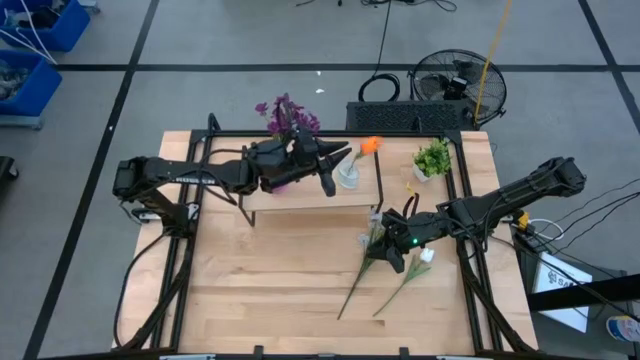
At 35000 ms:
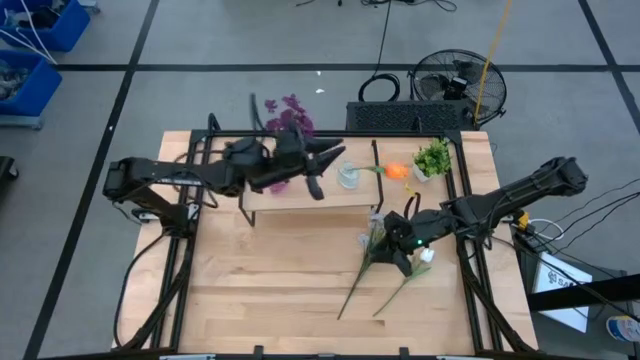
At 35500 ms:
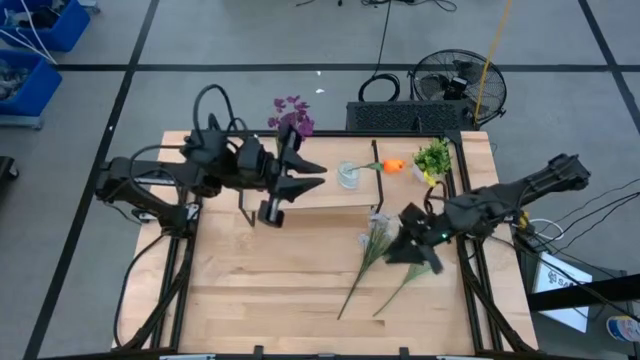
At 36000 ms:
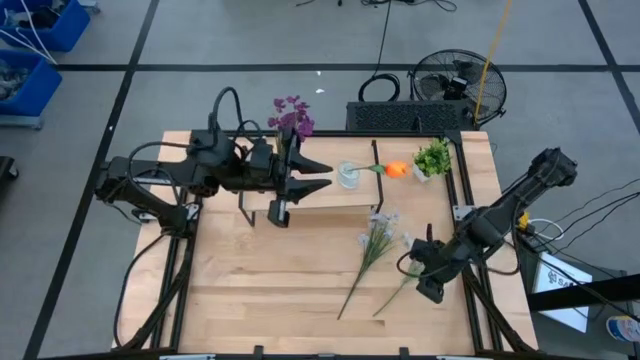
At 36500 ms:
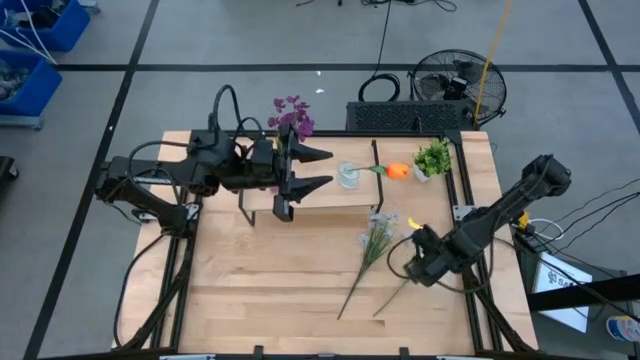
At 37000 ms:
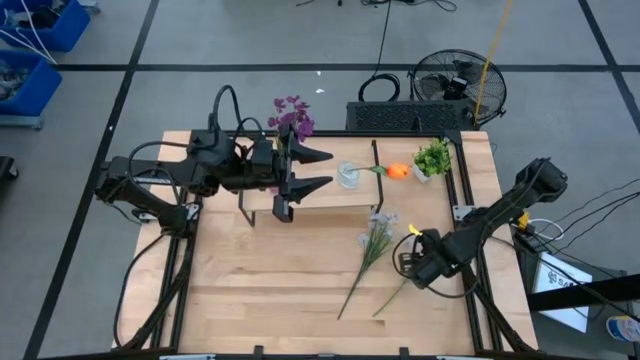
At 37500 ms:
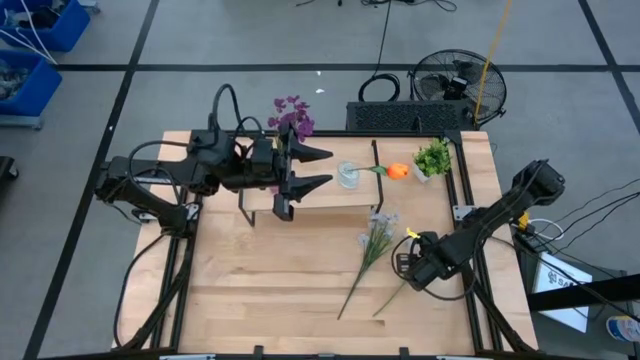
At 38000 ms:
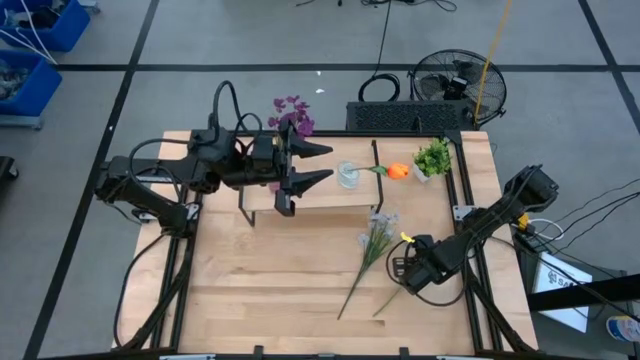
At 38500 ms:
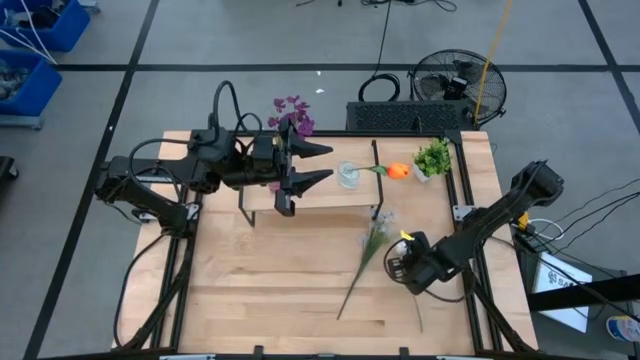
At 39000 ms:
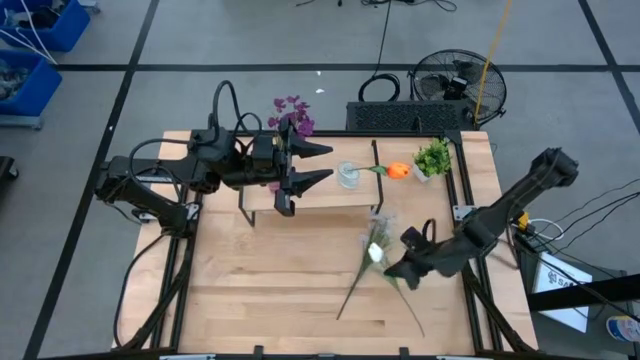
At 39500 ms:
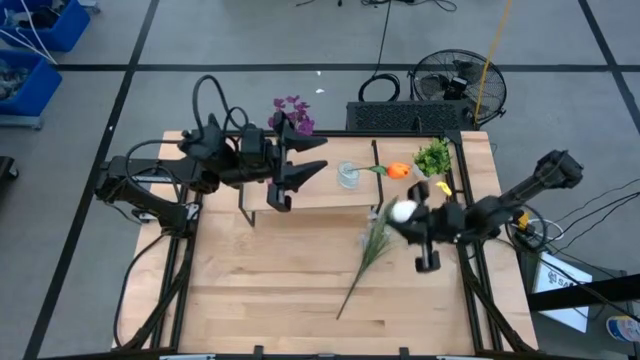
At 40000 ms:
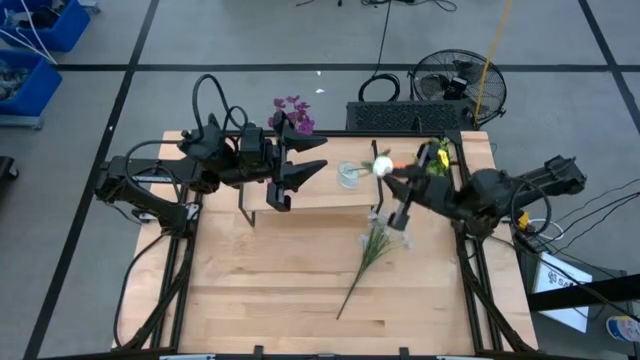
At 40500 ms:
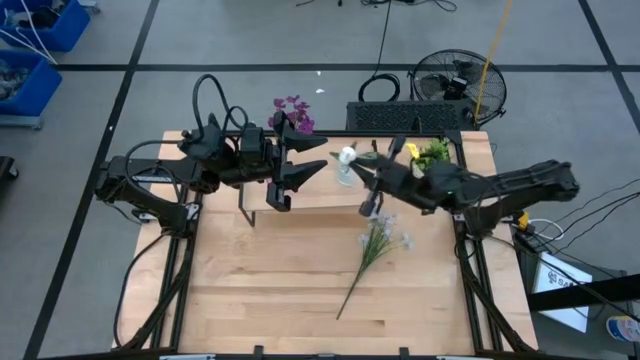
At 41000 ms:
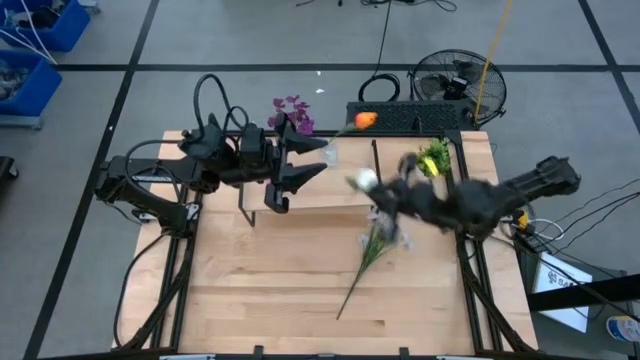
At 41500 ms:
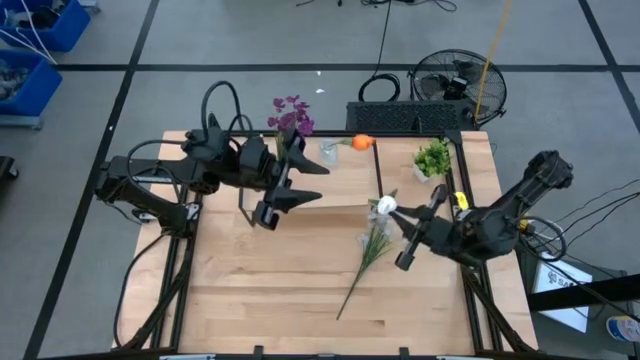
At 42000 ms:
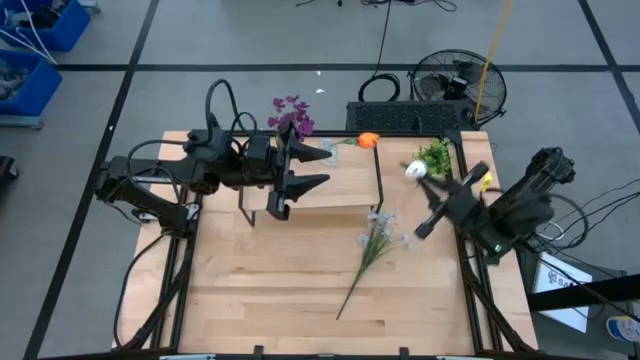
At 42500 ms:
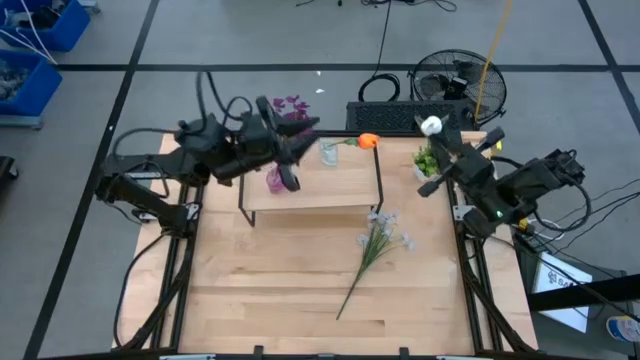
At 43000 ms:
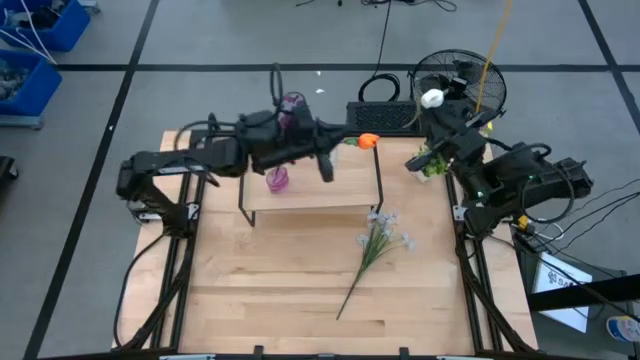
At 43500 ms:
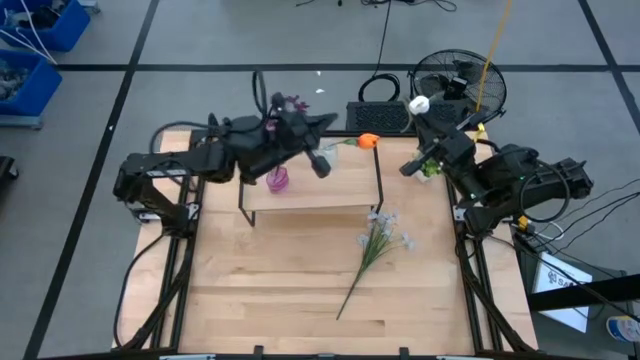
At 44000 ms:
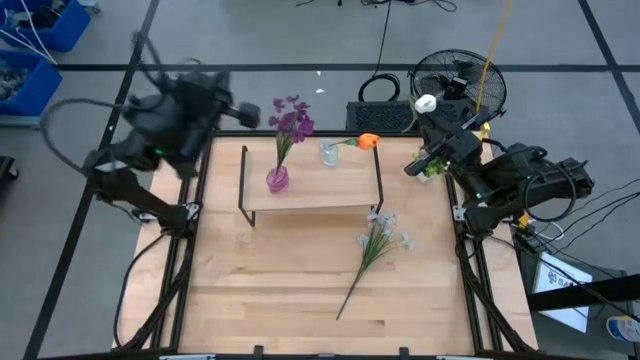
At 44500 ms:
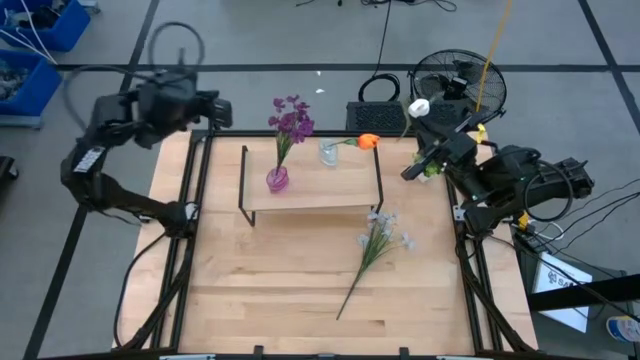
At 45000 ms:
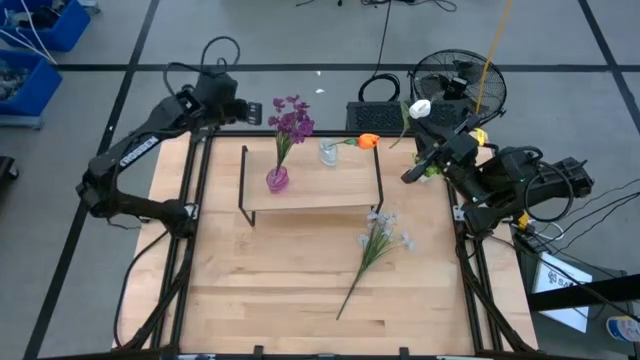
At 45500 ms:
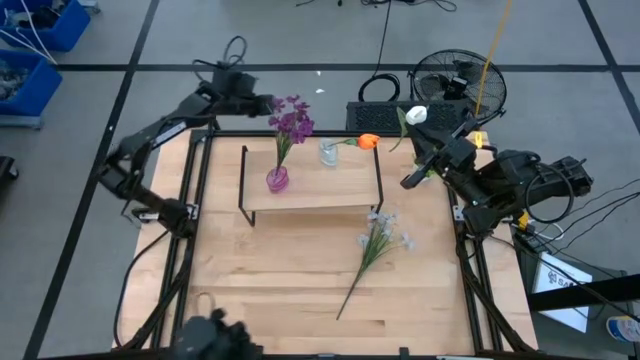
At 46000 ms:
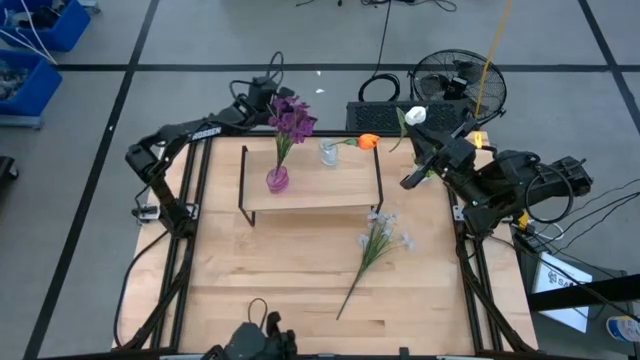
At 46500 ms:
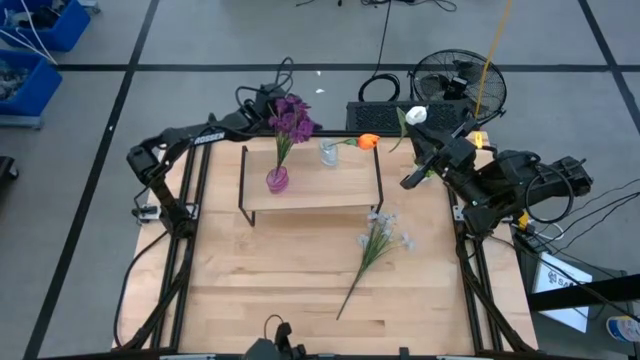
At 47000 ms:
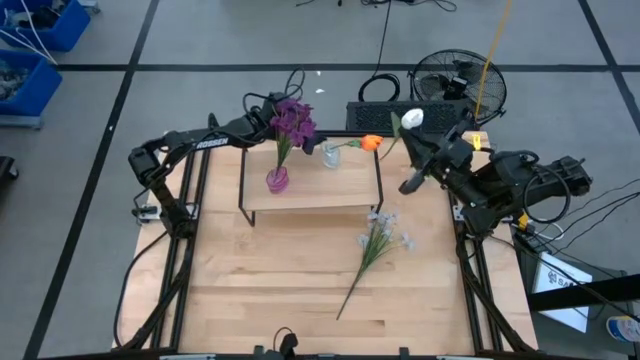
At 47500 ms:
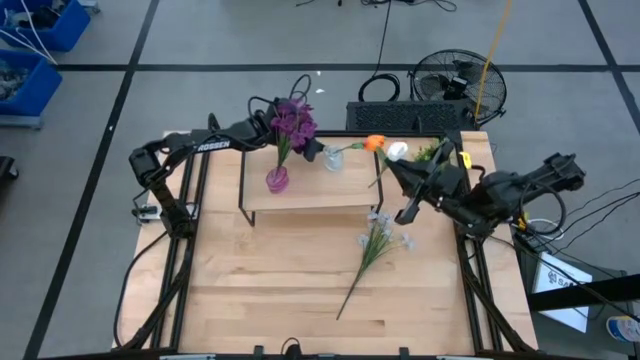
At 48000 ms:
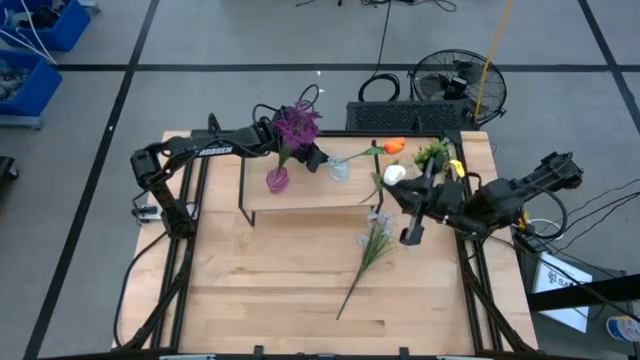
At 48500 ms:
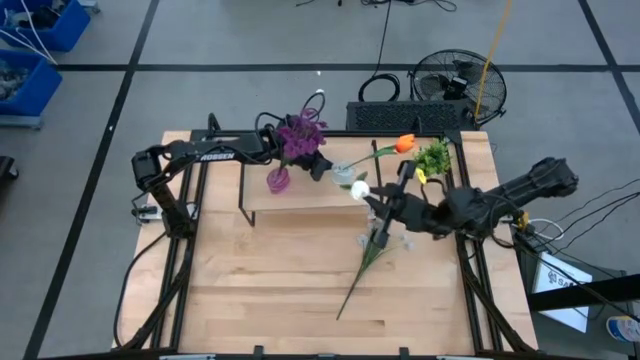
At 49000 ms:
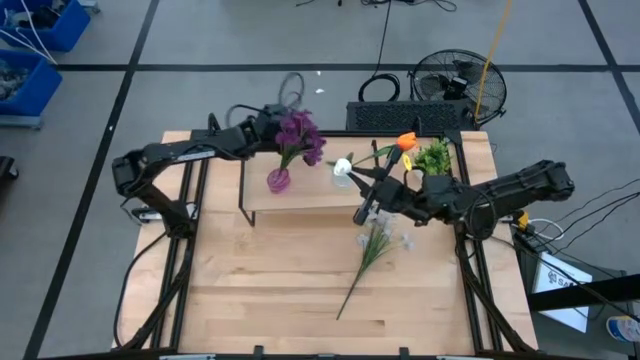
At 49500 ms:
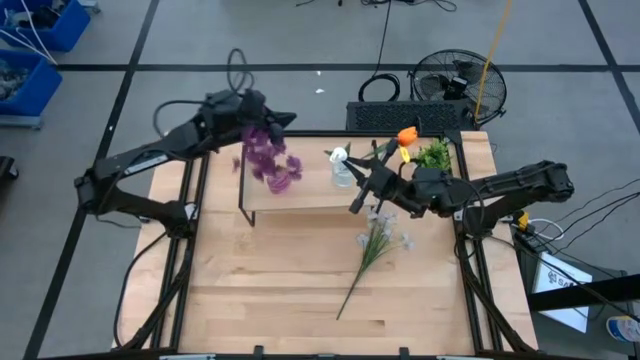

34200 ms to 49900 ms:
Task: Pick and place flowers into a vace then onto a shelf
Put the white flower into the transparent vase on the shelf

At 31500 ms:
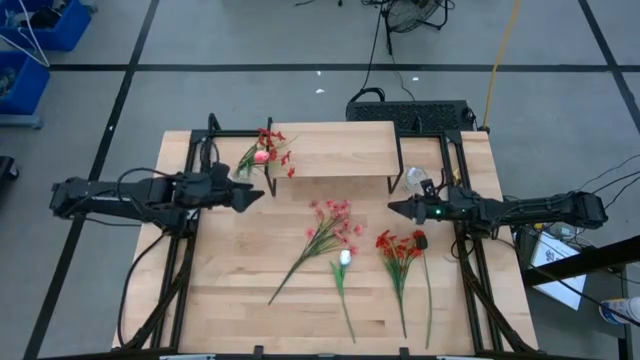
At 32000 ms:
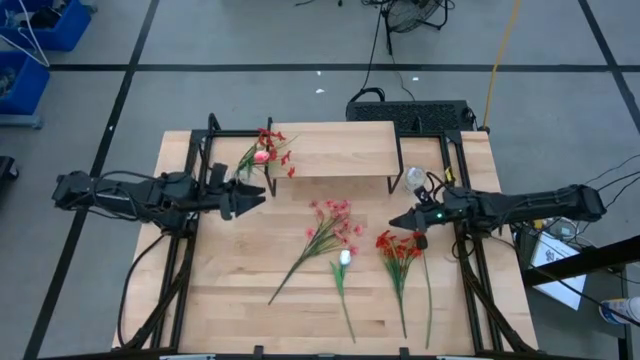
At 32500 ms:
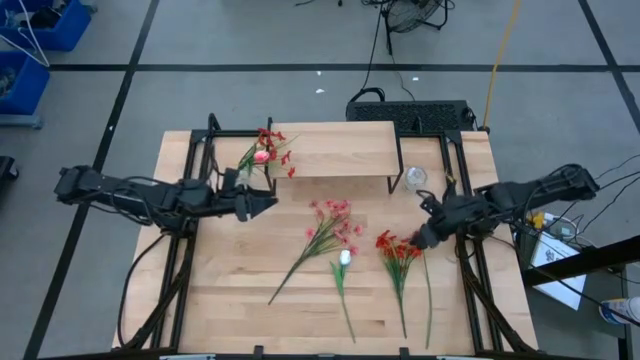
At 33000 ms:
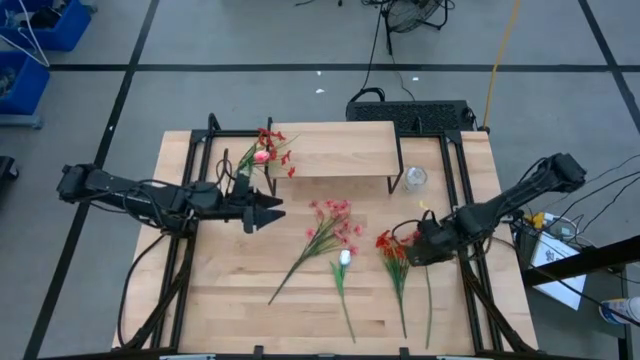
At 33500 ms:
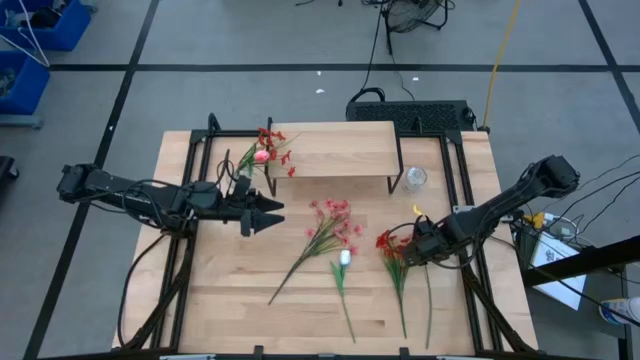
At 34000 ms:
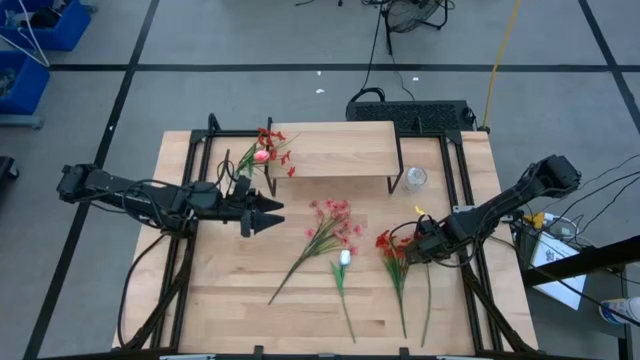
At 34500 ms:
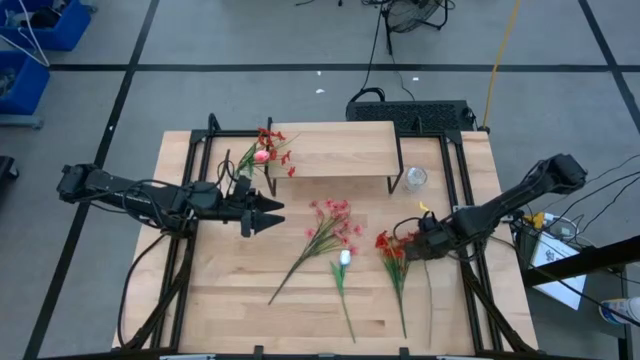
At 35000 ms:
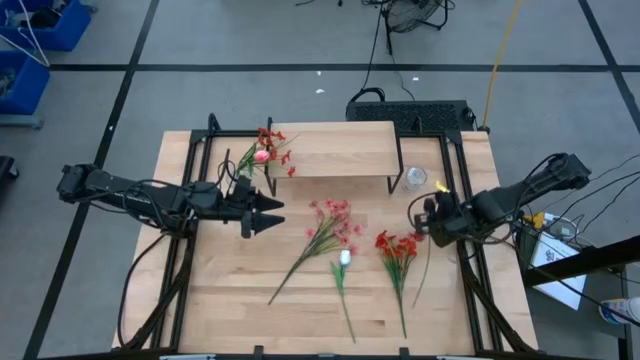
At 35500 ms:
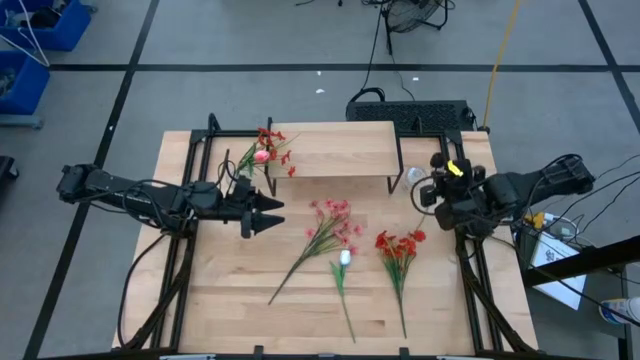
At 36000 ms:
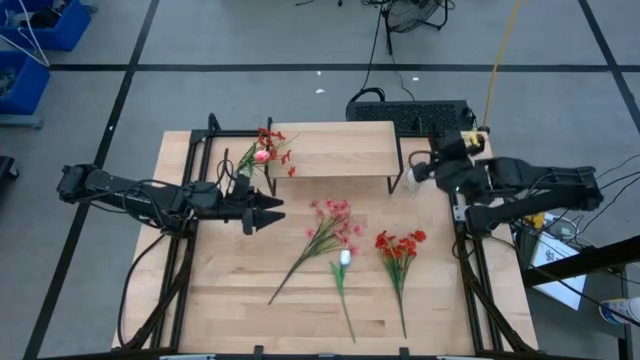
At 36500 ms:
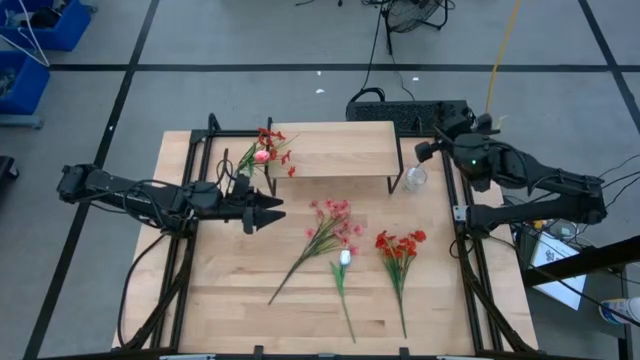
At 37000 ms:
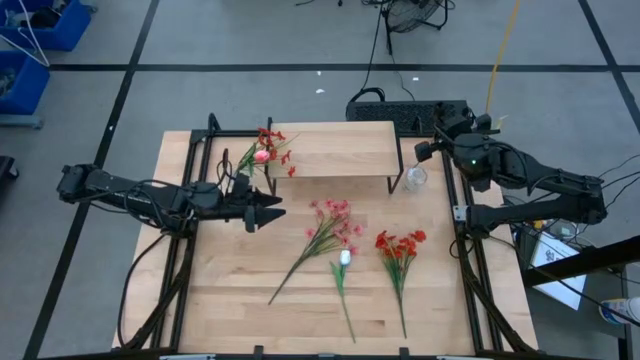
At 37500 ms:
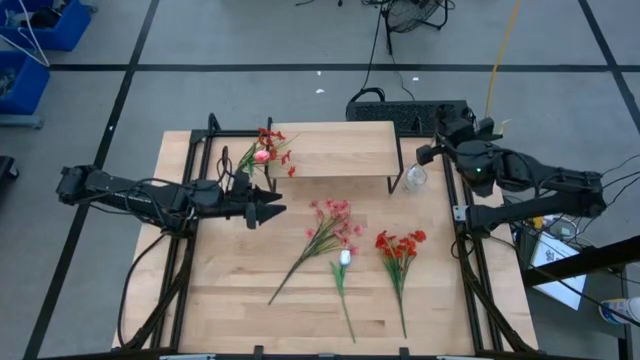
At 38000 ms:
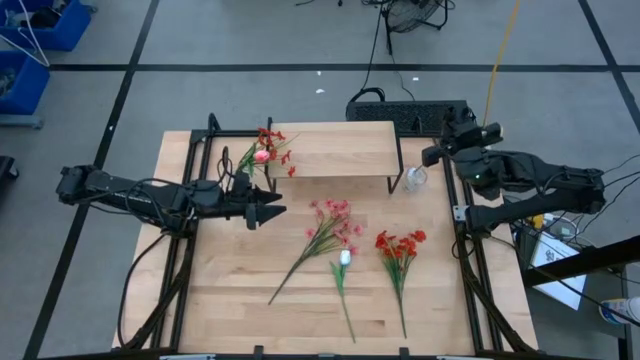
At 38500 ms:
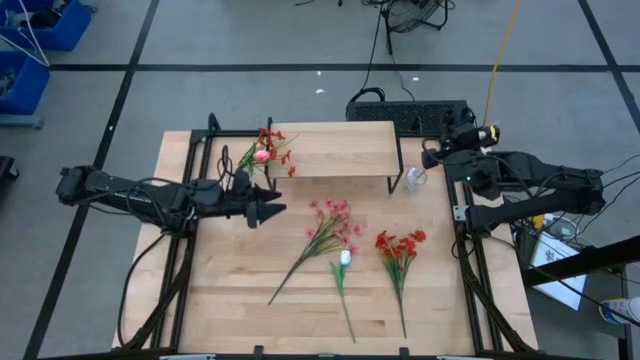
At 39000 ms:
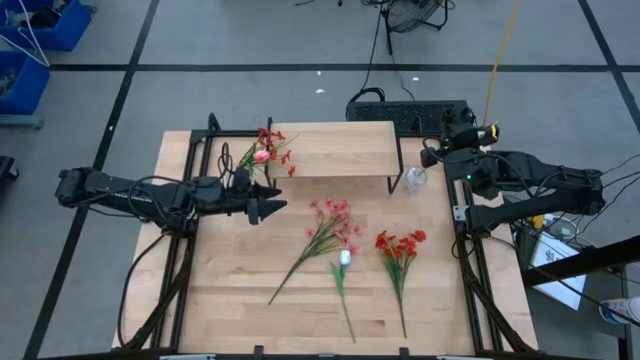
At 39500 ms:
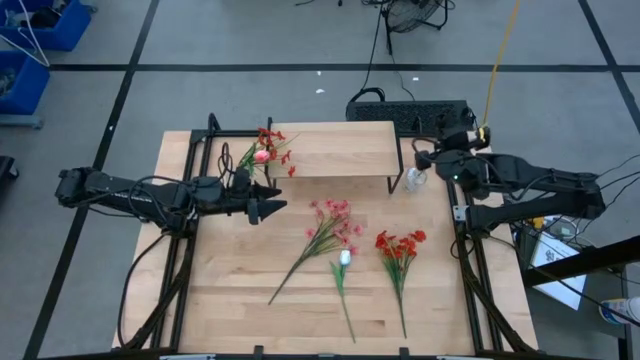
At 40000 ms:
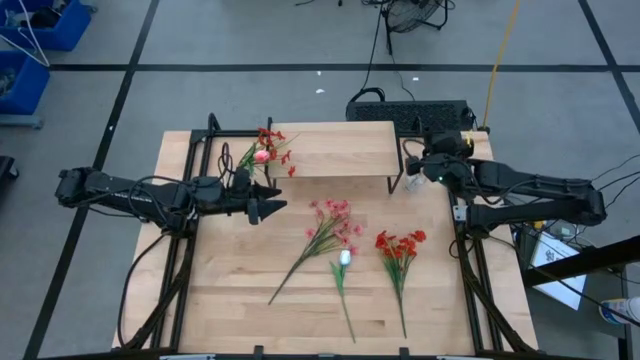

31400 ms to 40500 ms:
Task: Pick and place flowers into a vace then onto a shelf
Put the black flower into the right transparent vase
